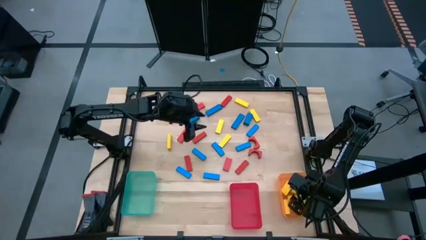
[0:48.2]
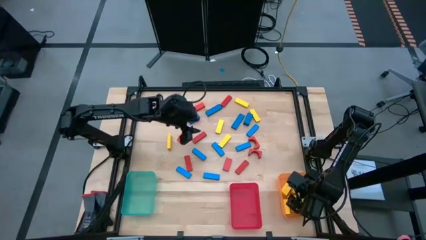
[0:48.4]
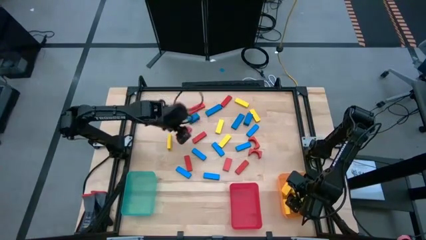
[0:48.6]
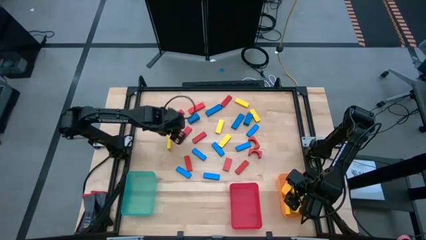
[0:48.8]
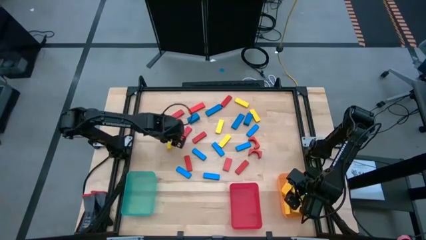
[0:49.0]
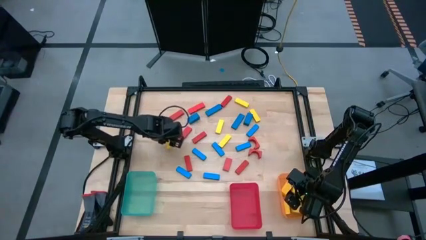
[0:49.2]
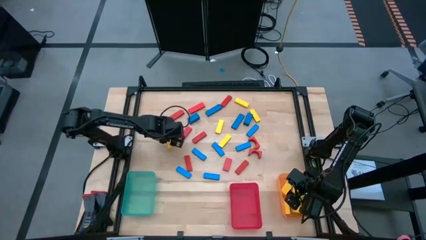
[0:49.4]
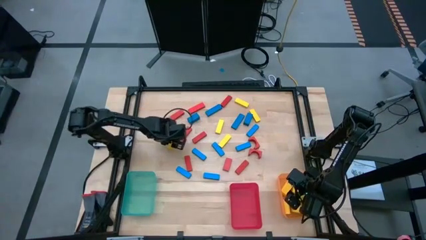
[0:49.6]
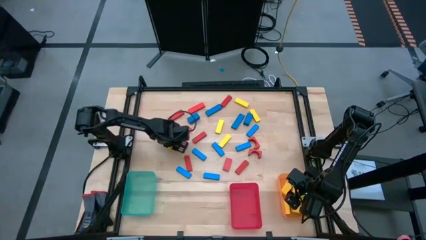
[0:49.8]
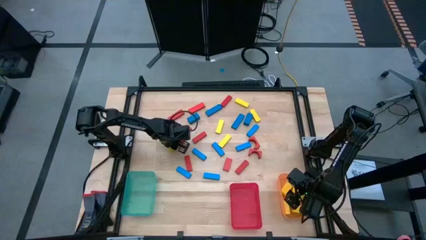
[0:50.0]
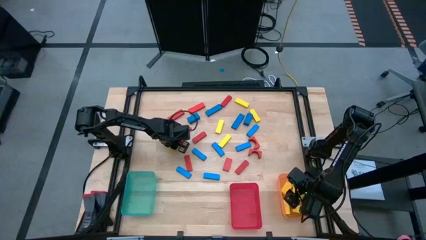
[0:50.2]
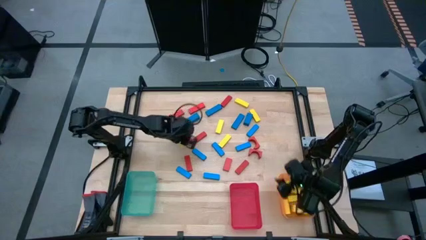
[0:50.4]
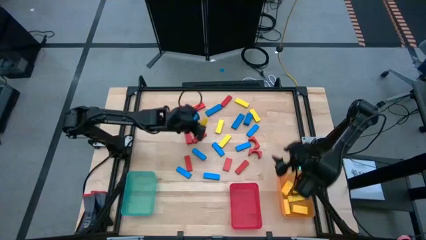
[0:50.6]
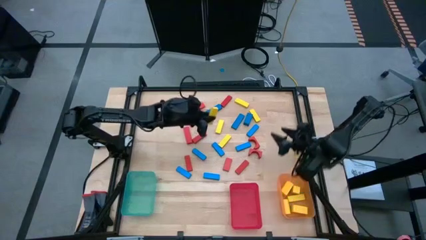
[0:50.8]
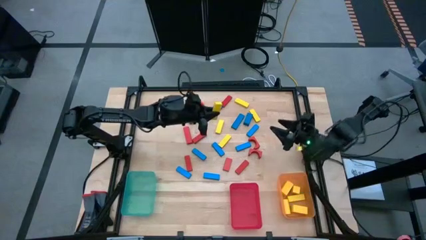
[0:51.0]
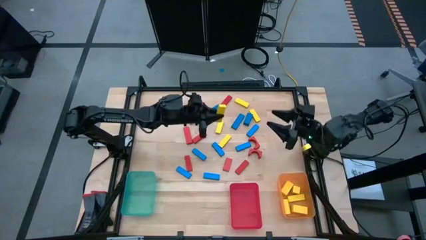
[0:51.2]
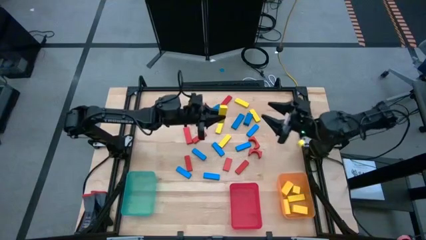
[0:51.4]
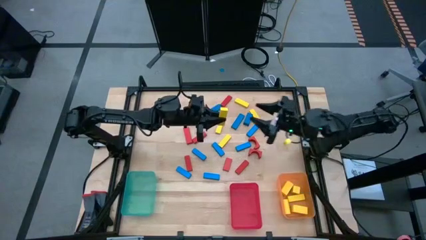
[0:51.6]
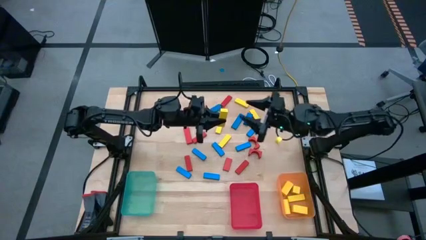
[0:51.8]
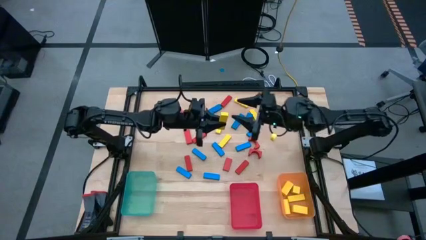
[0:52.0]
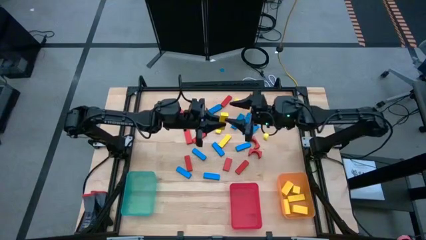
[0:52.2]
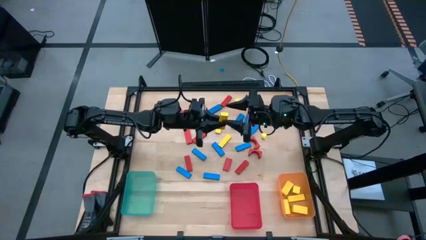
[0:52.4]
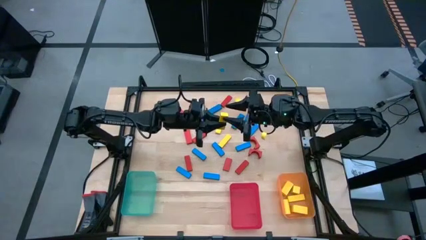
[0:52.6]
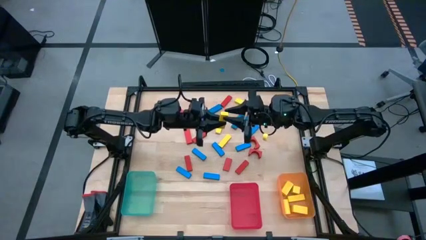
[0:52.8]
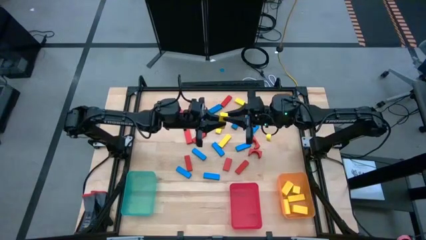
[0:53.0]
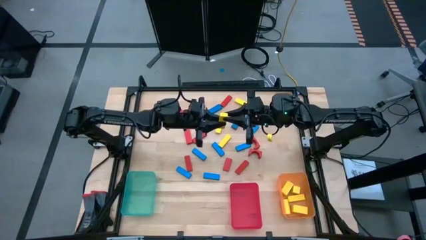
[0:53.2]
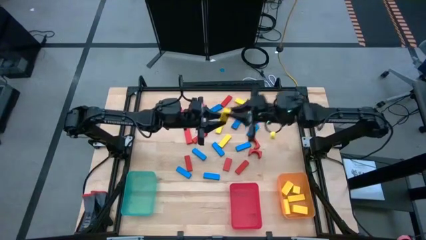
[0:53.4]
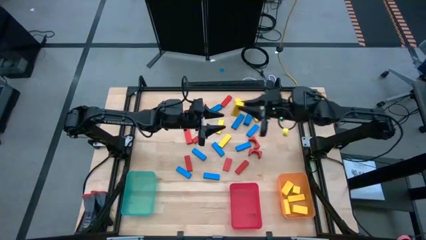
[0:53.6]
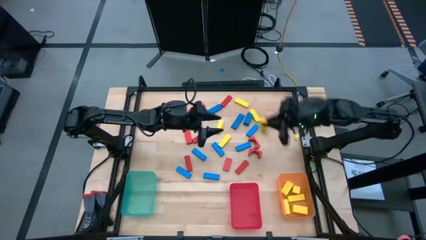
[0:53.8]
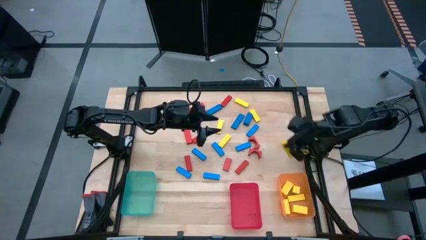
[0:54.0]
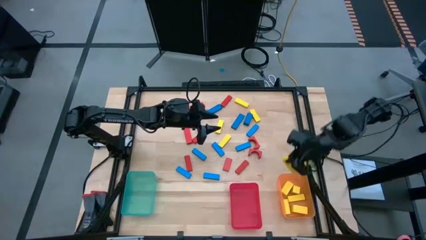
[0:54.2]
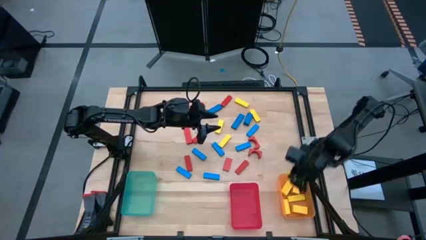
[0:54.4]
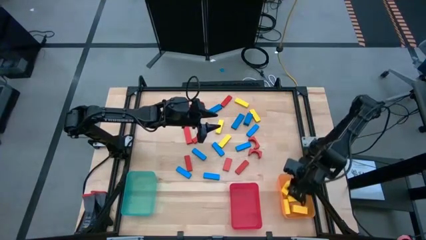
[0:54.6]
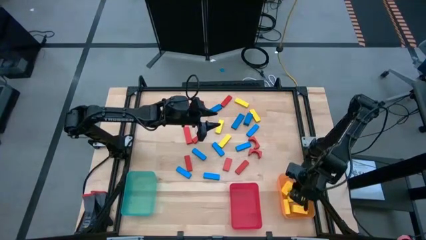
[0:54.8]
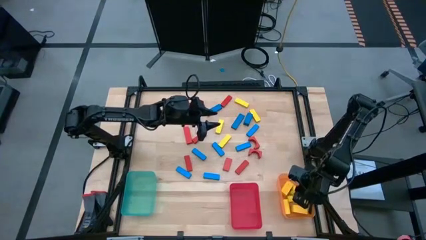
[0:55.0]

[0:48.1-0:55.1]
Task: Sort blocks
Put the yellow block into the orange bin

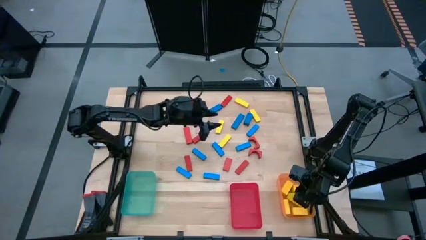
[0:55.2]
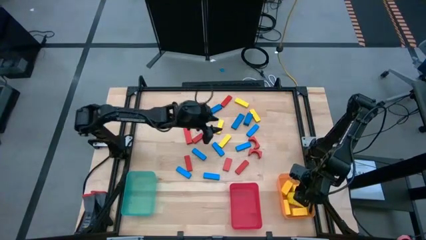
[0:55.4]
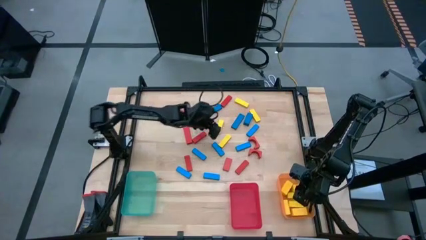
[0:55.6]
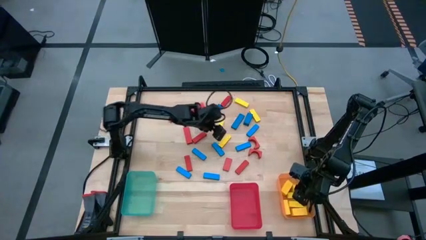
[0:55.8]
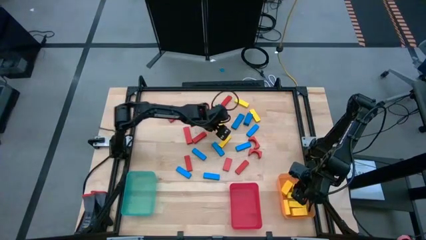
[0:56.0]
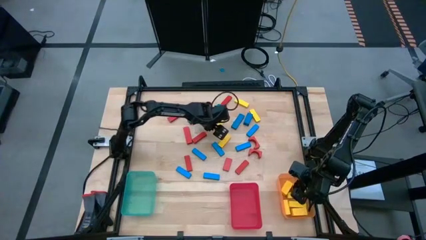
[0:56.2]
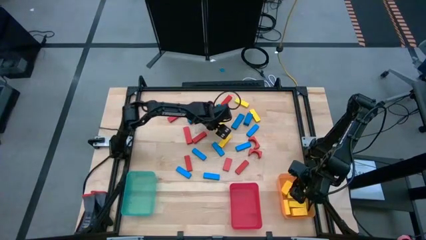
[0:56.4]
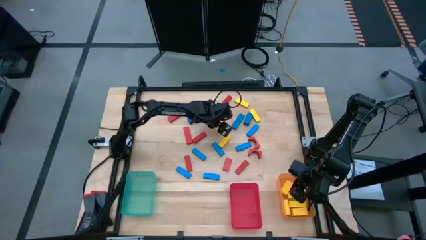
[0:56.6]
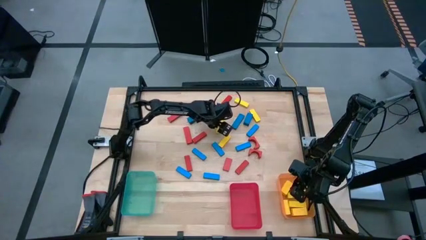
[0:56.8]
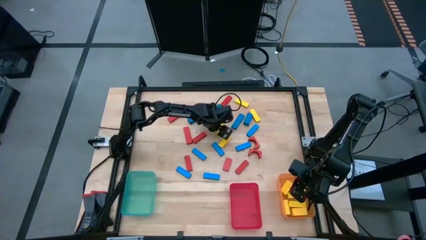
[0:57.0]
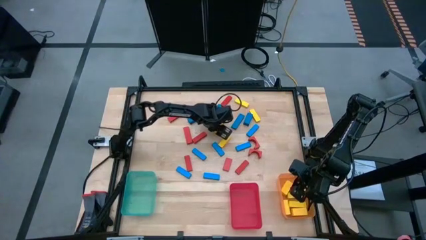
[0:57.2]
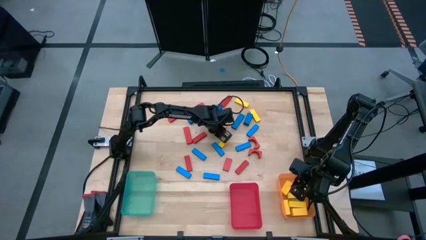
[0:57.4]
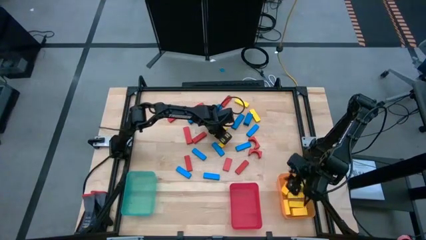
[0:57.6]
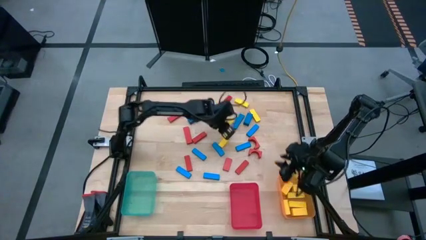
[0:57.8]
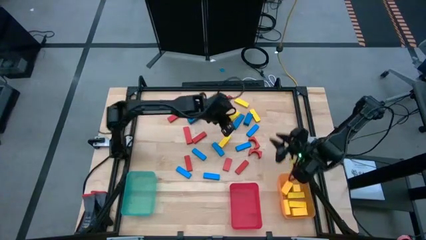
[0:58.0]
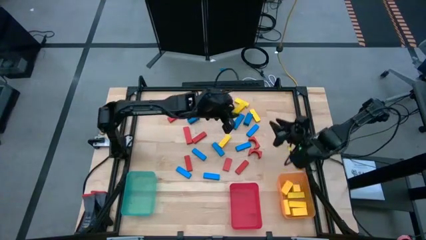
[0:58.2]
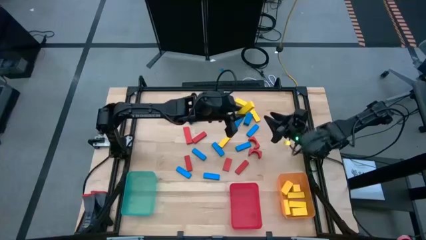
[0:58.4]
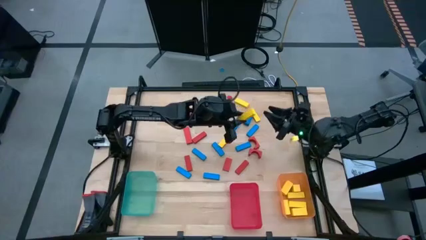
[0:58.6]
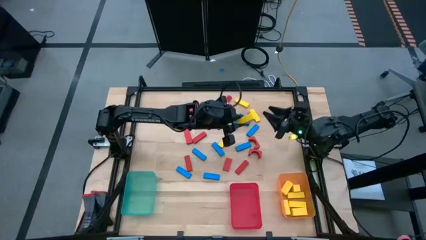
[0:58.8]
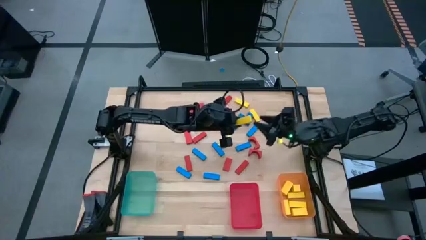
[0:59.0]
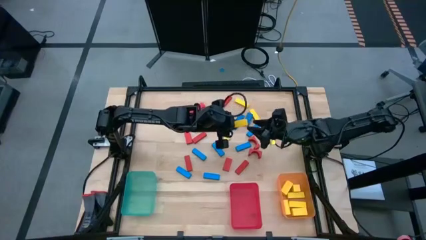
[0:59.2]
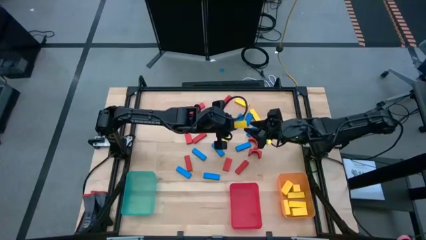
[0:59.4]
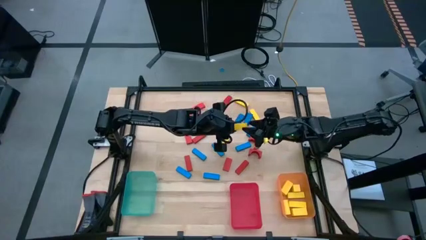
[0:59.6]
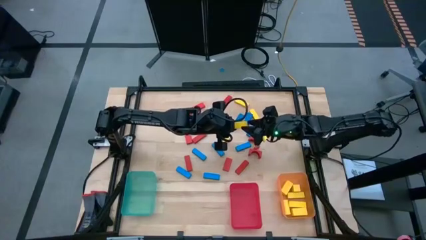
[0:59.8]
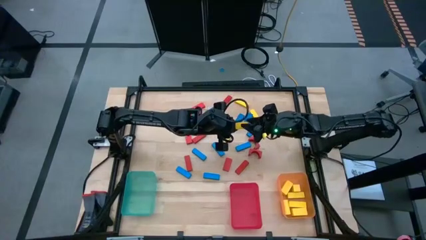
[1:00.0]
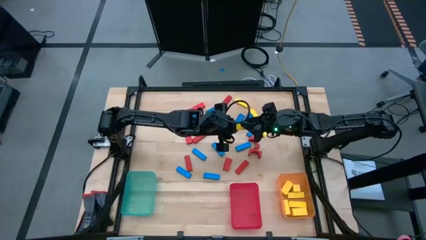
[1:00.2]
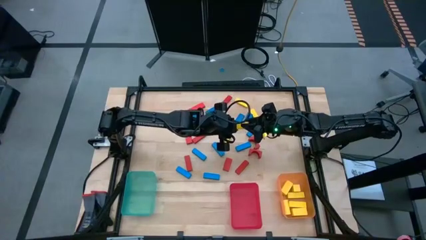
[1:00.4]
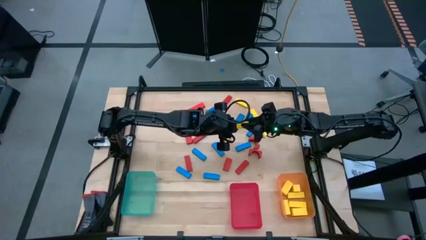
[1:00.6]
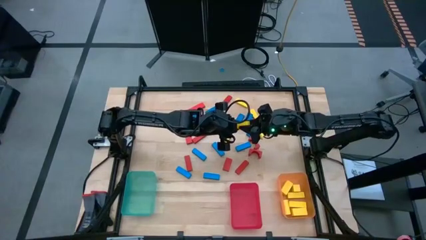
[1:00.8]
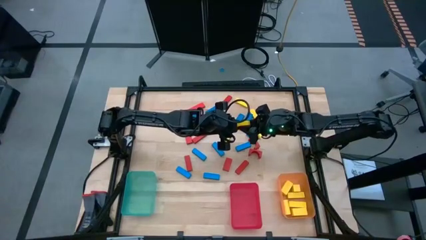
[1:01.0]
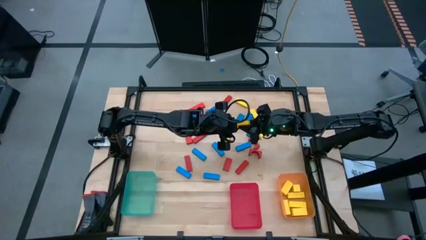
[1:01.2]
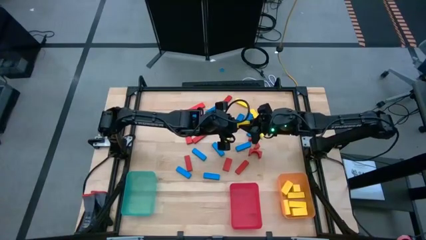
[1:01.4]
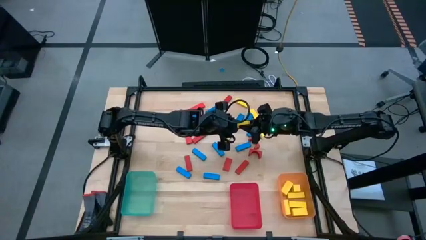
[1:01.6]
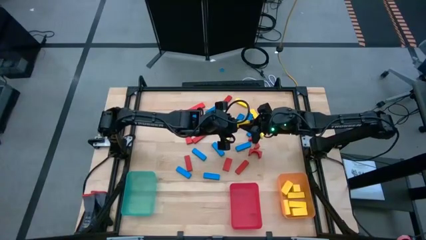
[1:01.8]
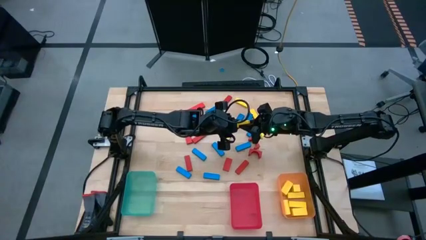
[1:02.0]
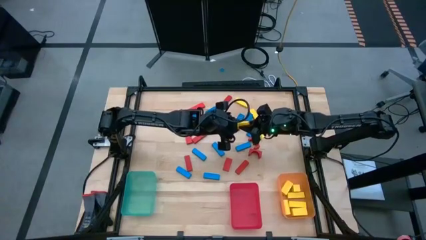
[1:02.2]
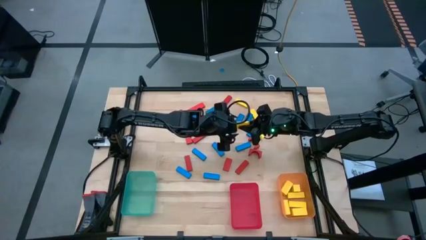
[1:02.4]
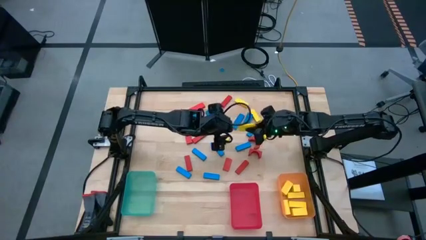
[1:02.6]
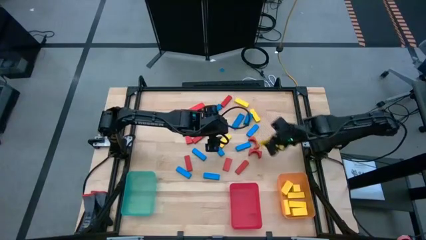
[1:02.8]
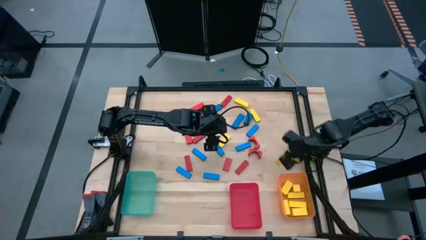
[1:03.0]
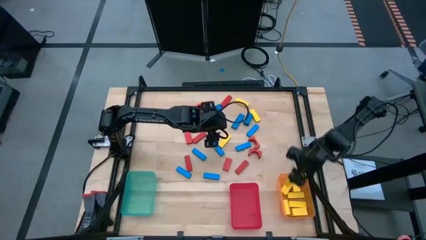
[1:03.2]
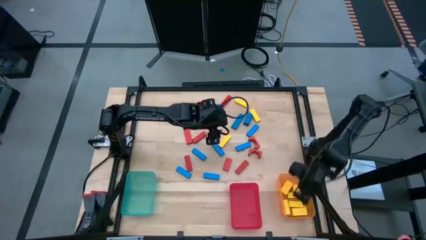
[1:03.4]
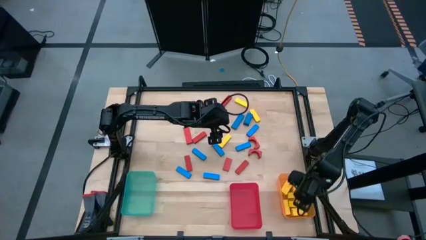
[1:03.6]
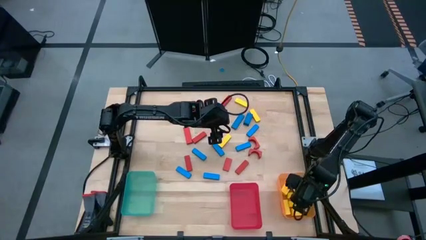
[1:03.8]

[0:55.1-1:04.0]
Put the yellow block into the orange bin
